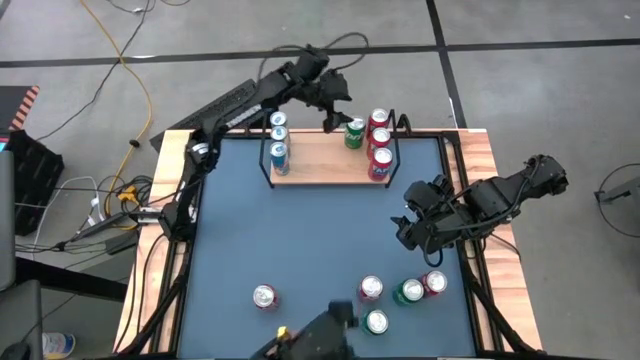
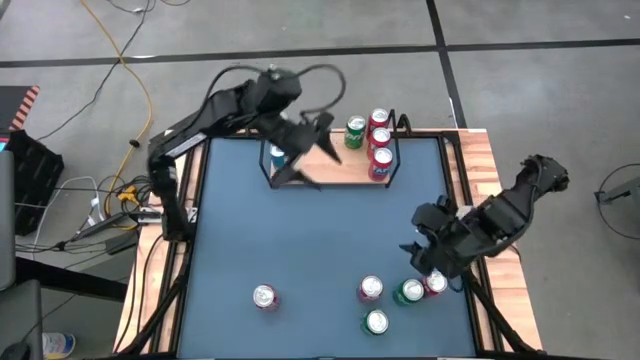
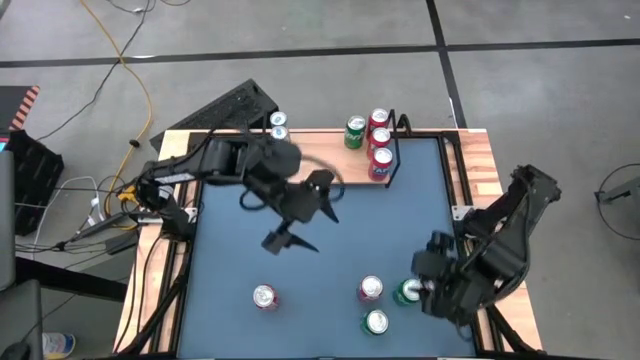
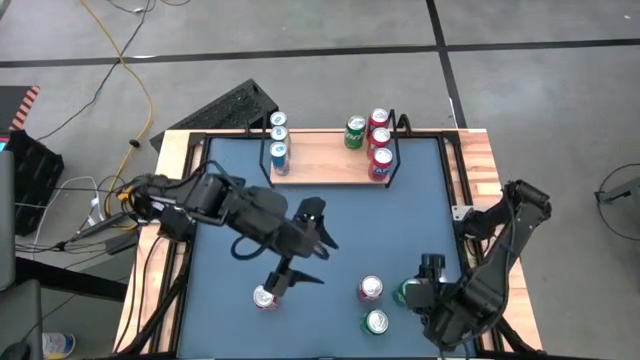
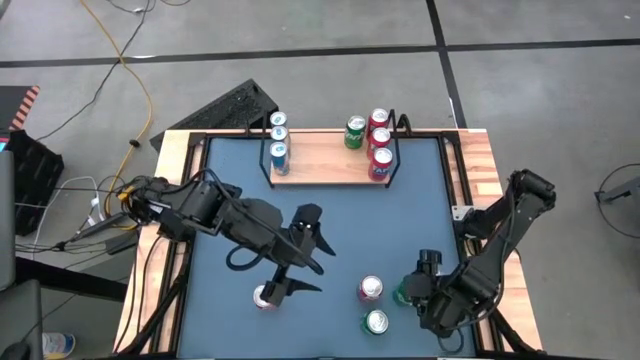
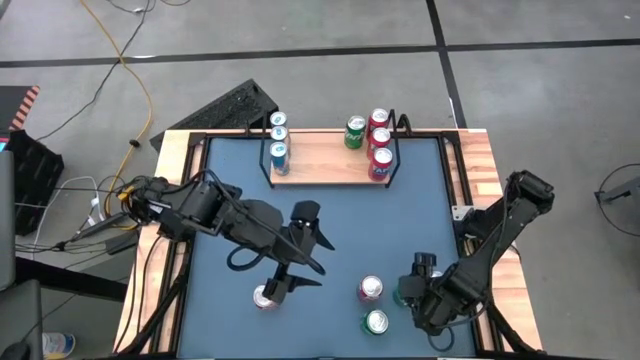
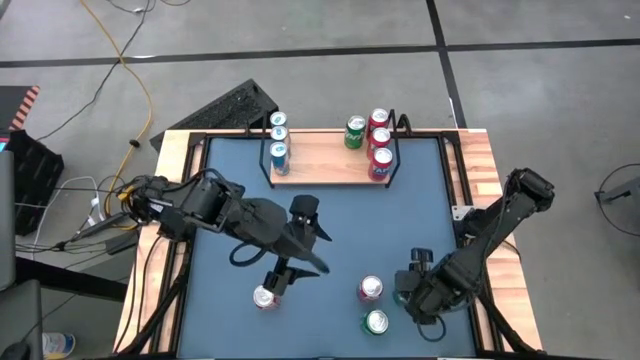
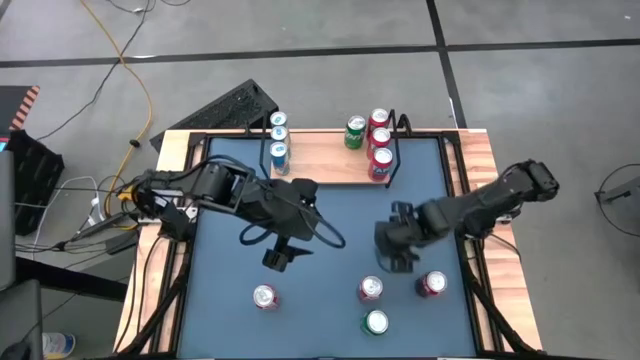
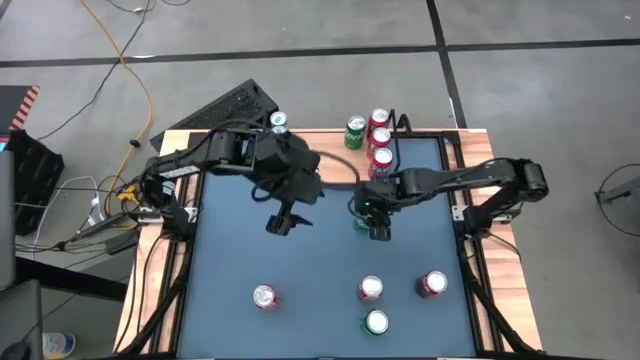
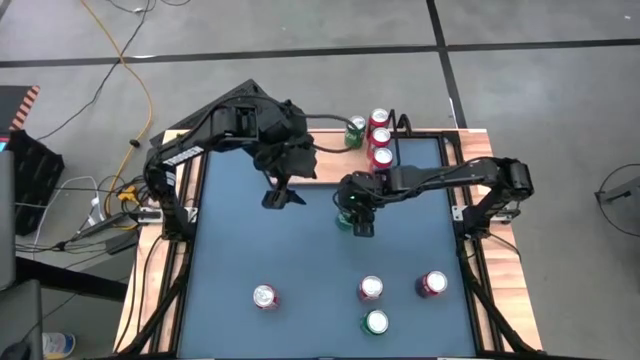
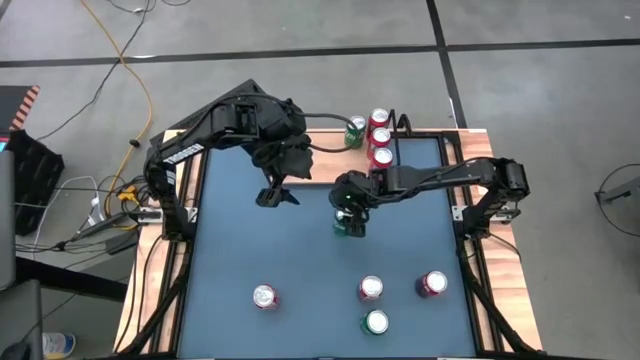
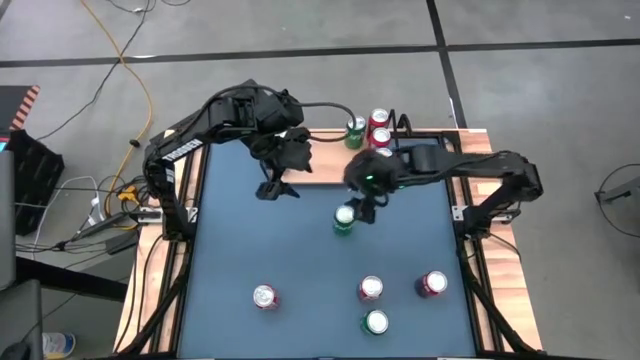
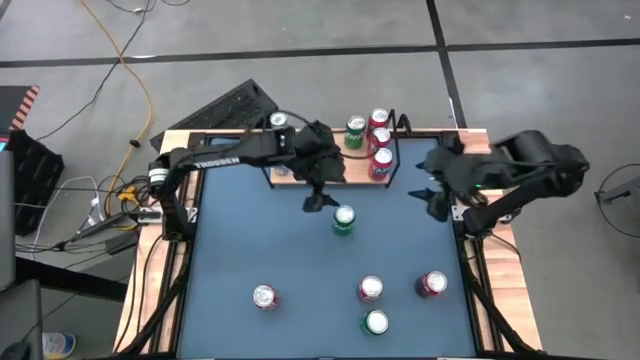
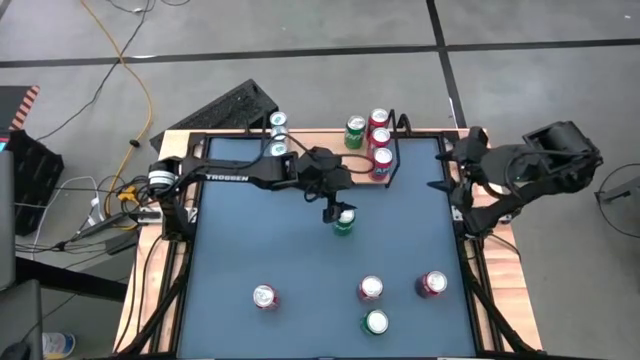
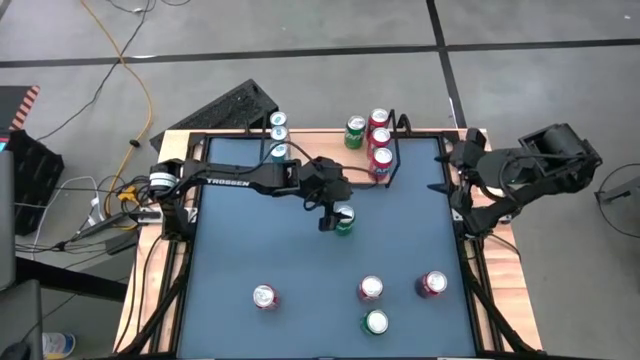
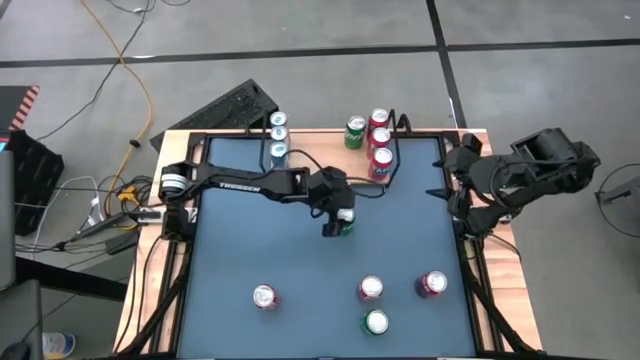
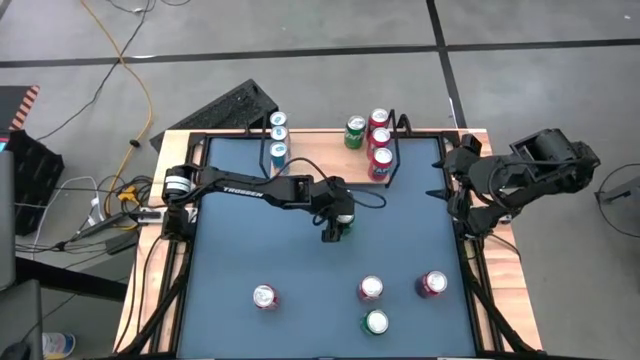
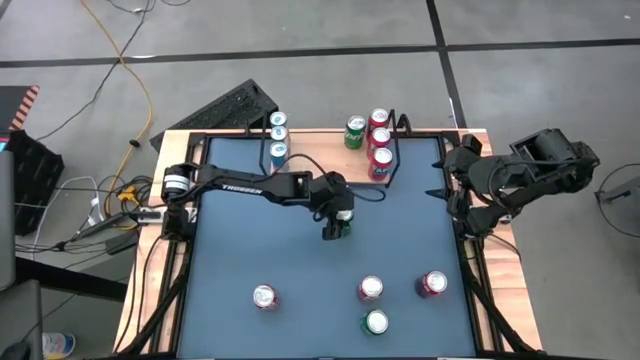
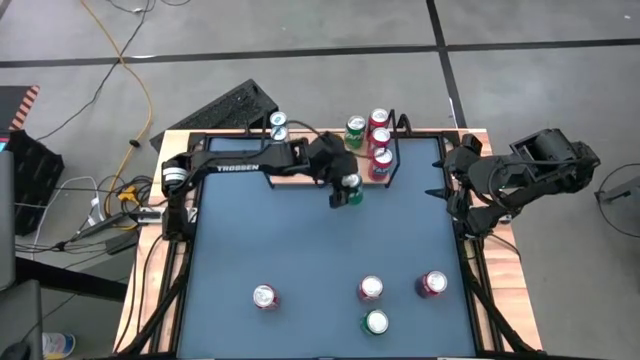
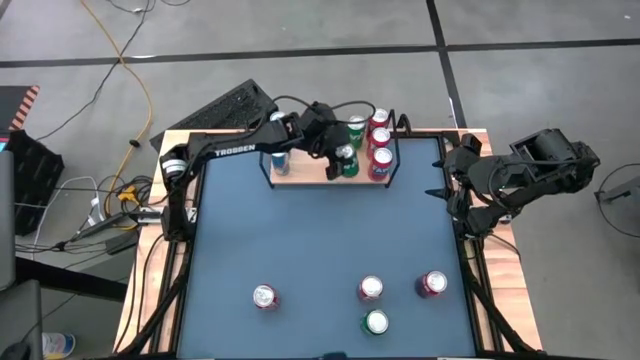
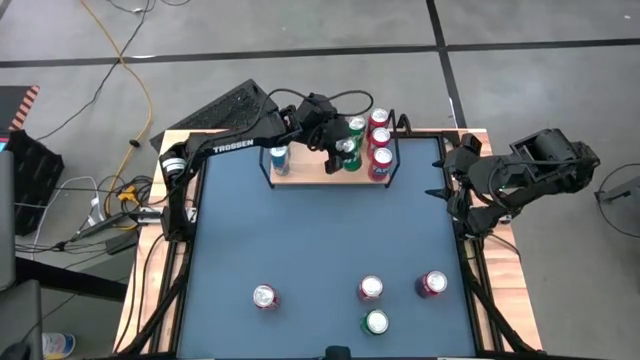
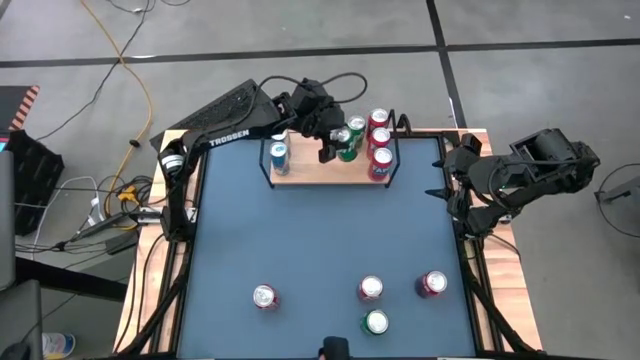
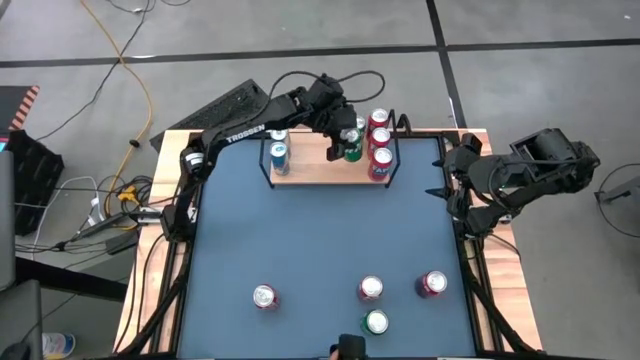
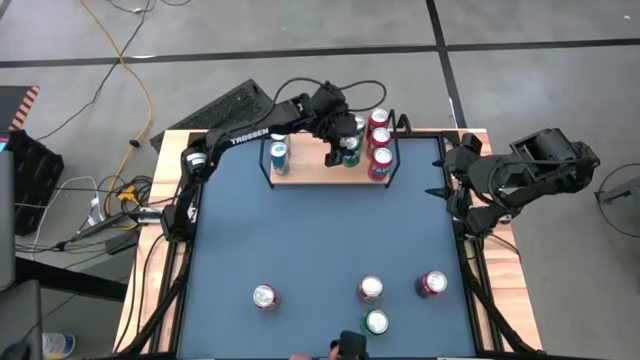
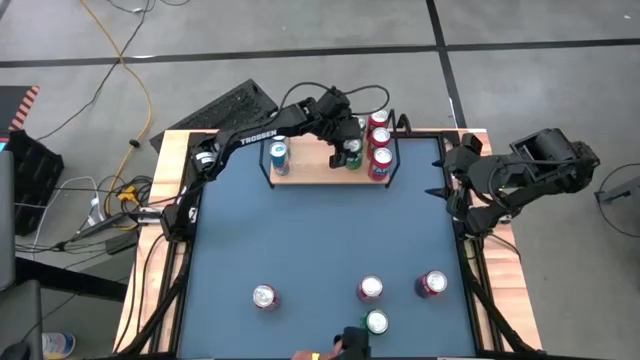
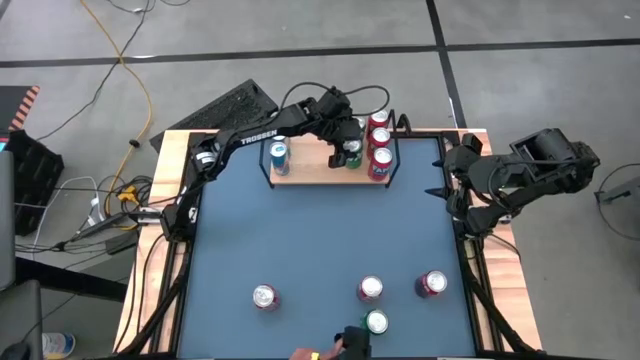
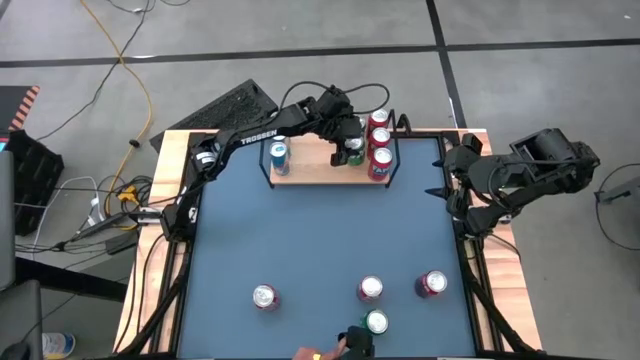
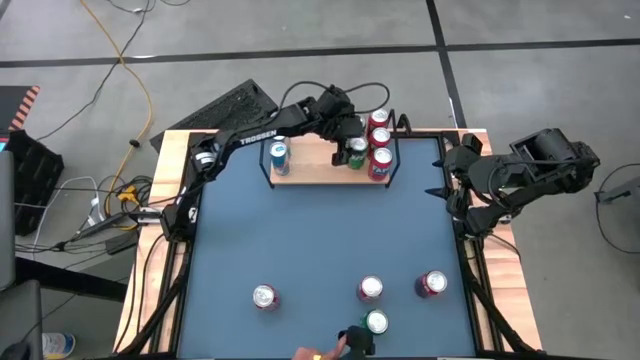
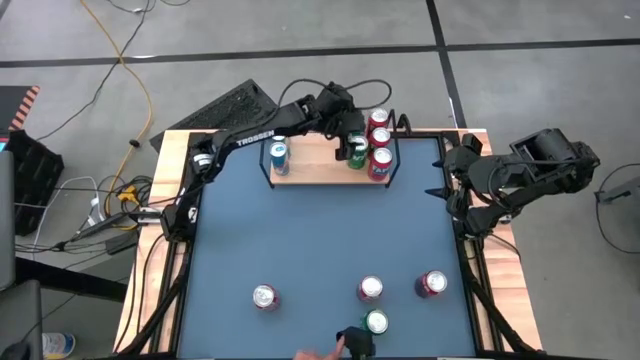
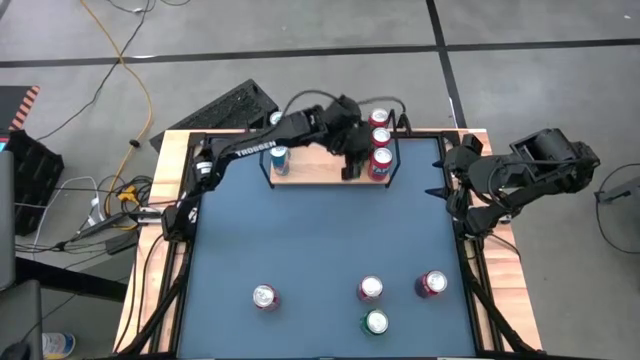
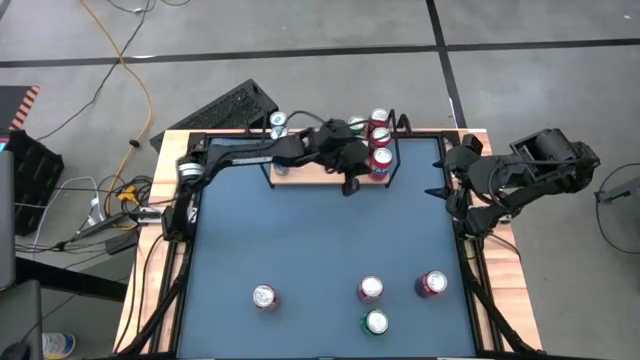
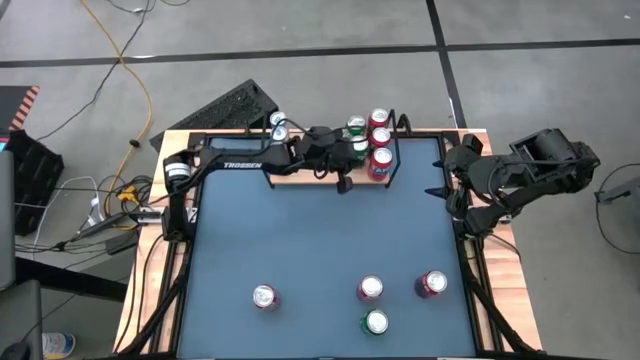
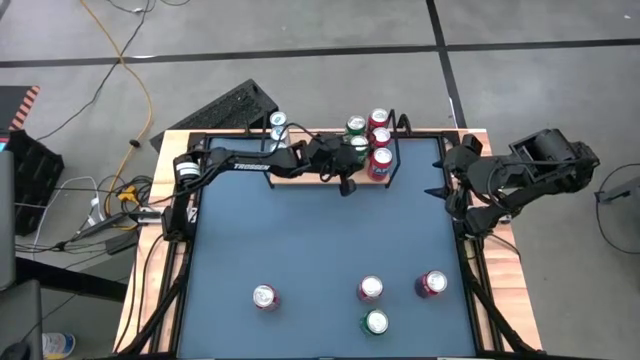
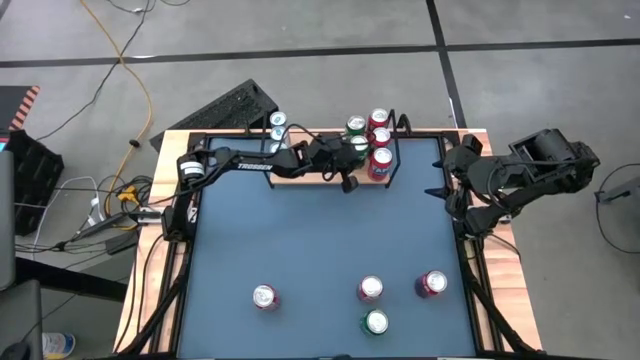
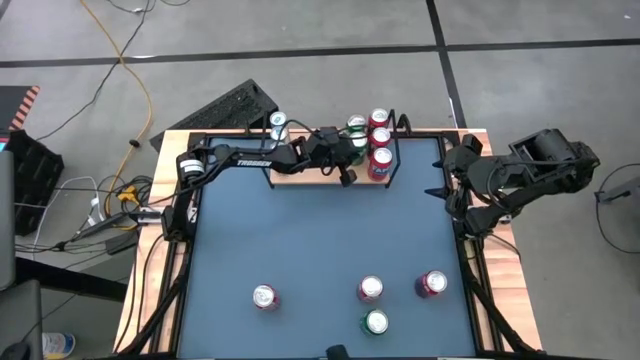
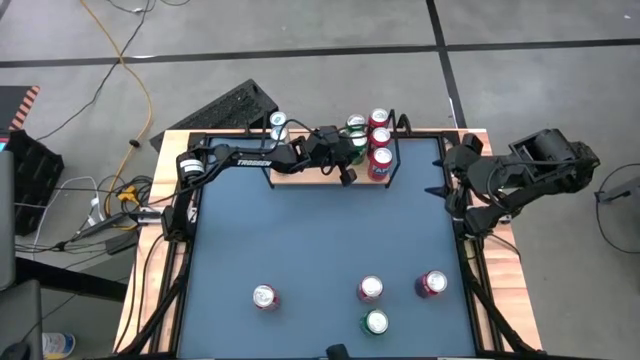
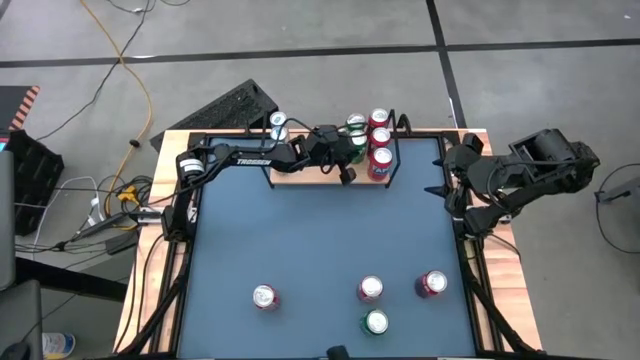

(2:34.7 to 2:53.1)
Task: Place canned beverage on shelf
Put the right green soda can on the shelf aligned with the other green soda can
